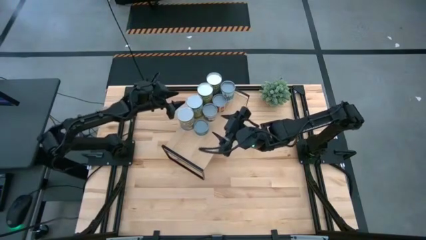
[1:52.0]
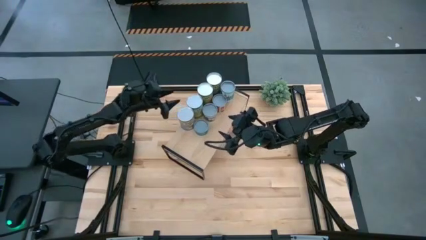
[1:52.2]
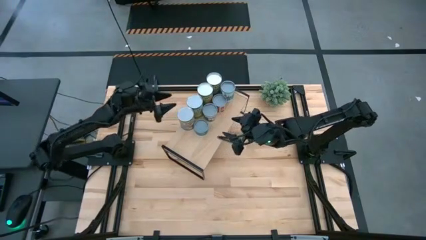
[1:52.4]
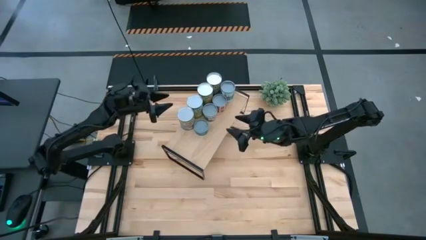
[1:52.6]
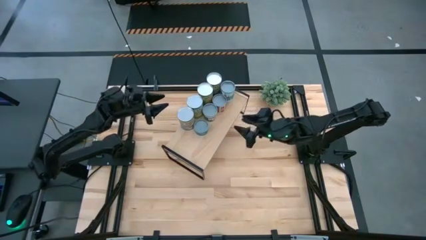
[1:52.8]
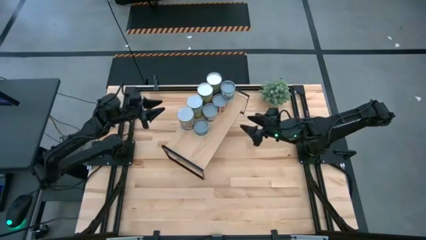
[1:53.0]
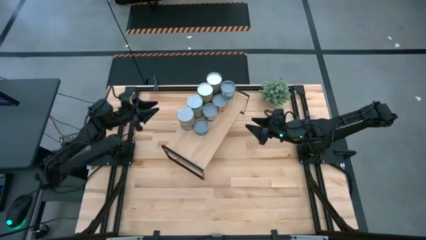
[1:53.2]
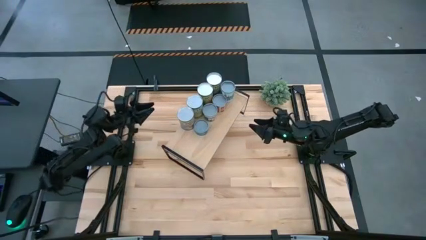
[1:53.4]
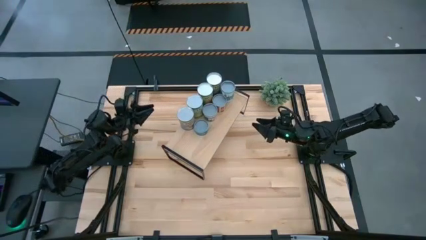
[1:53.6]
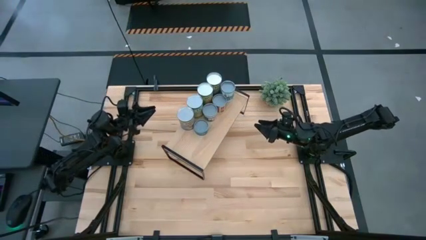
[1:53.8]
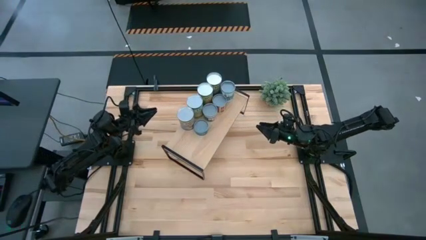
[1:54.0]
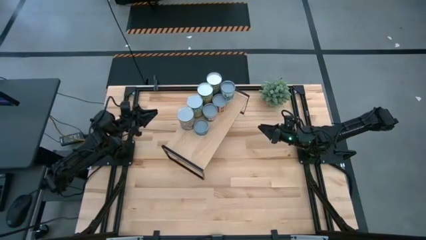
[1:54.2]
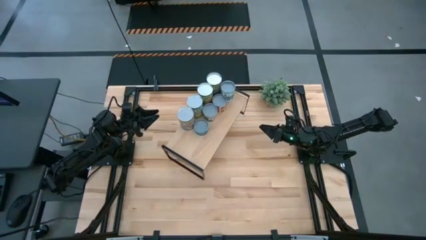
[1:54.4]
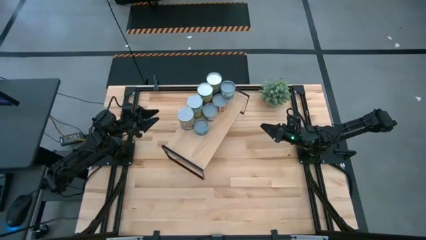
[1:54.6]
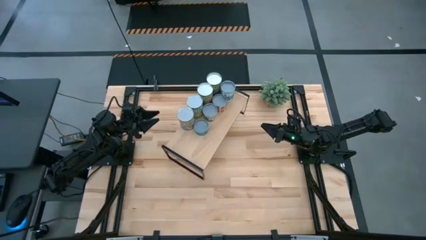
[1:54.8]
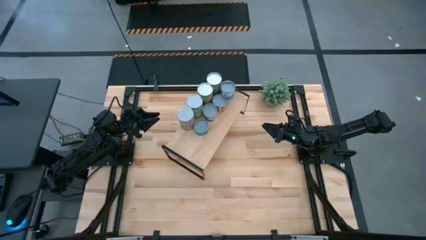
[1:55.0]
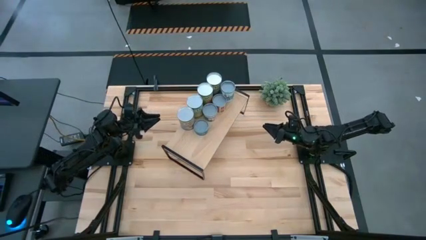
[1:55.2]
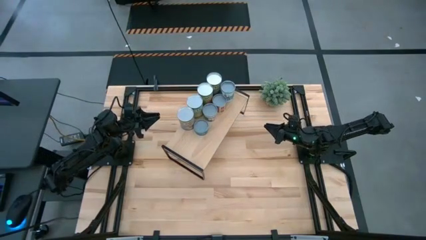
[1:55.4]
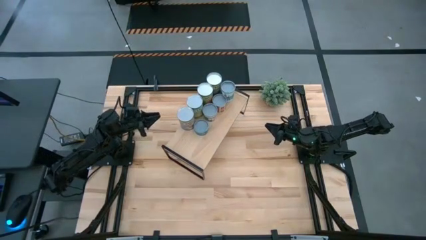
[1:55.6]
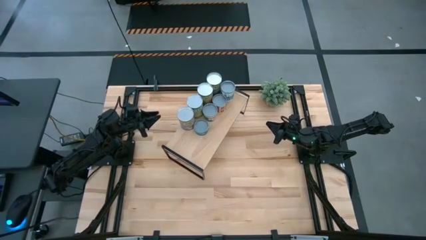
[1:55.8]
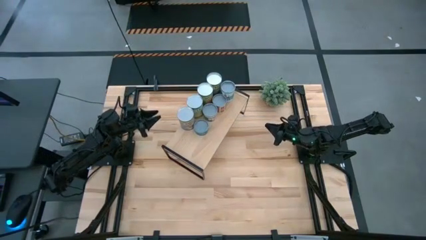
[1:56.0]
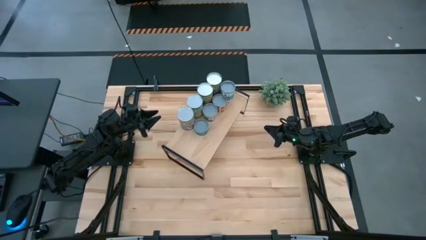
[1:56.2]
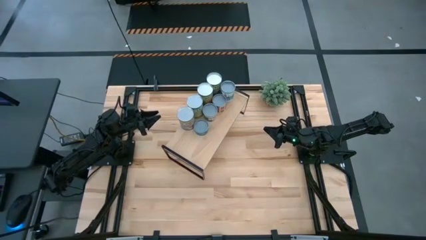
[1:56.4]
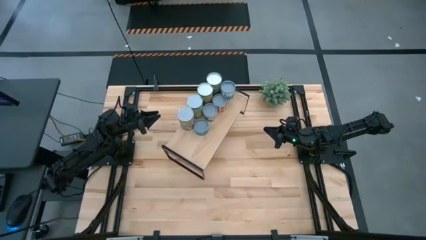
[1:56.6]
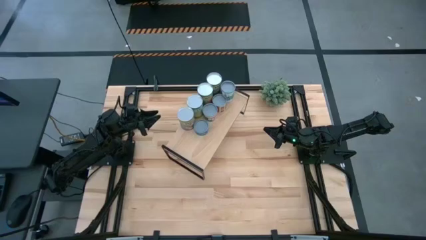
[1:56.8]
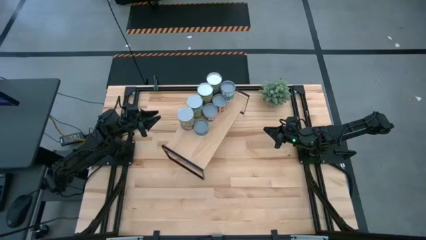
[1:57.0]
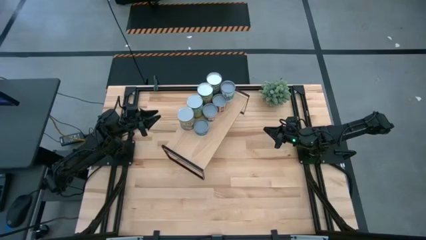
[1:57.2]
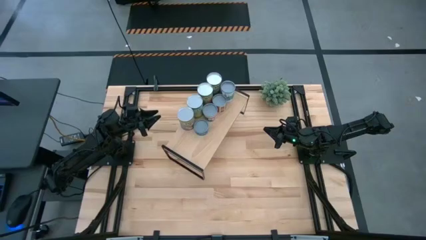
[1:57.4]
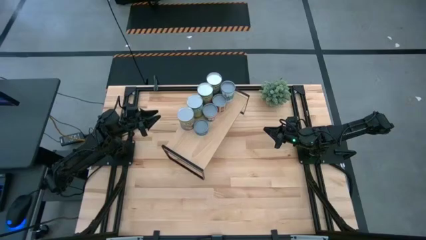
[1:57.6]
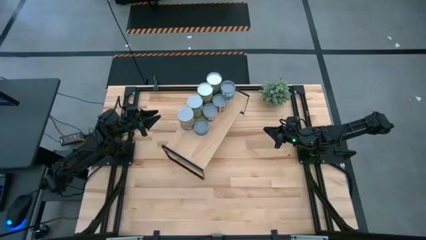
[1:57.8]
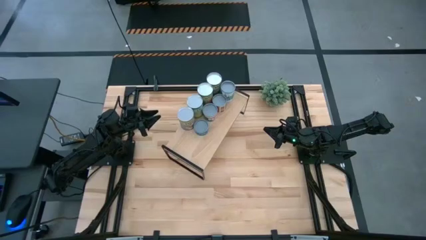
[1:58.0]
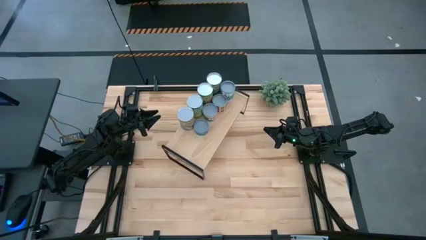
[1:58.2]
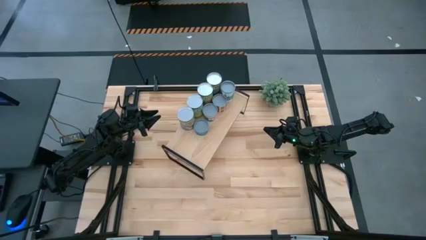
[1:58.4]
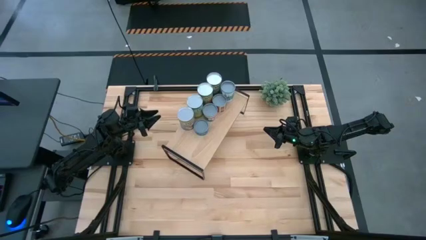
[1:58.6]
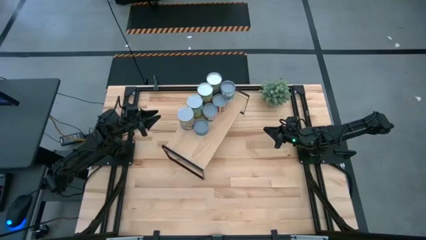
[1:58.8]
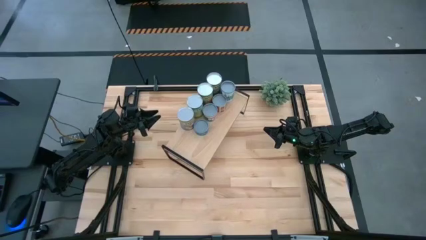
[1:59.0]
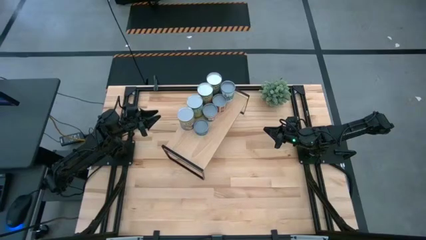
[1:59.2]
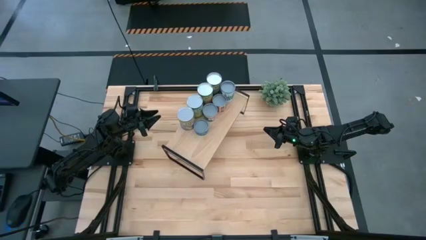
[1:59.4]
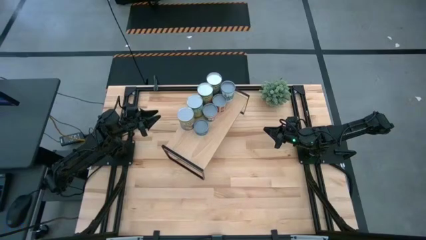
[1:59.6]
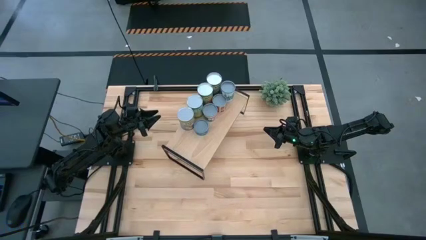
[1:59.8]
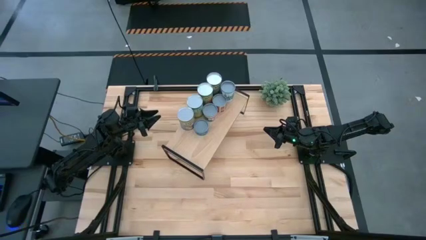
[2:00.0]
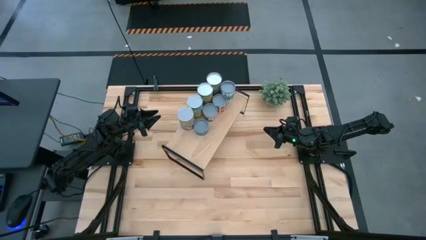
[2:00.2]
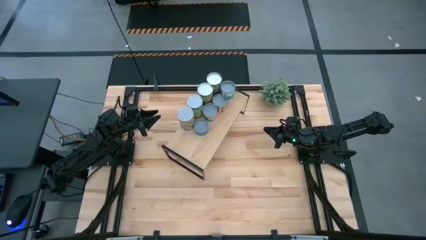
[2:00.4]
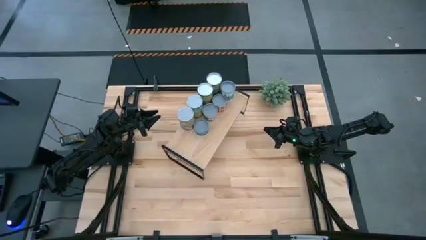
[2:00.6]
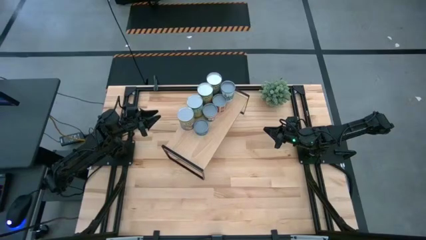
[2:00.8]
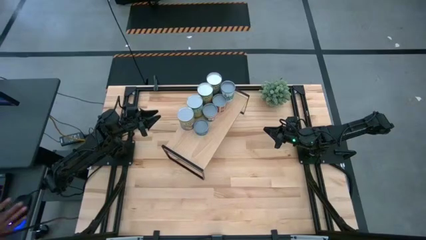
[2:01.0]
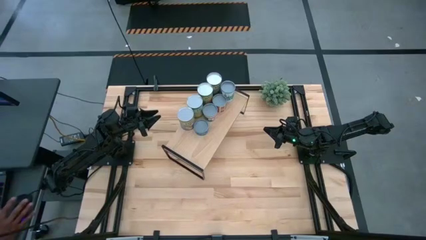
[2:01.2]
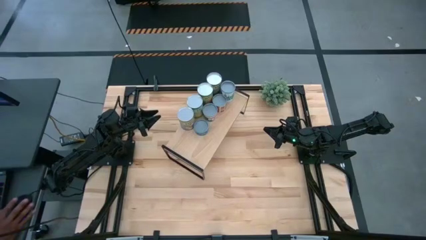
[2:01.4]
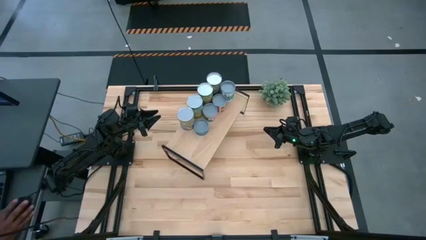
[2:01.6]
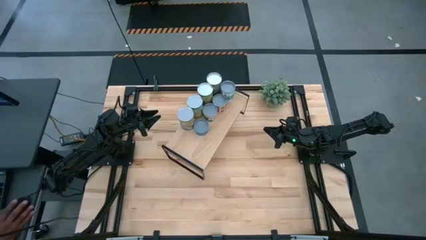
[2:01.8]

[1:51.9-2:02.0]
Task: Pick and place cans onto a shelf
Return to Home Position

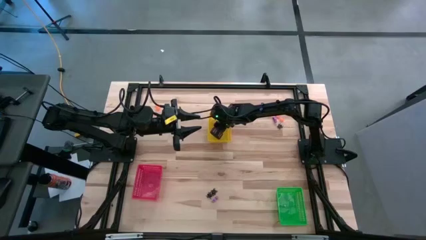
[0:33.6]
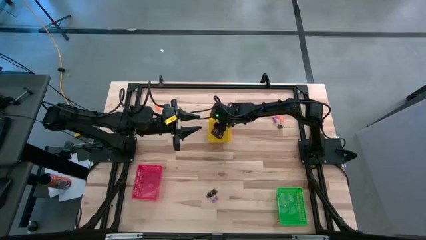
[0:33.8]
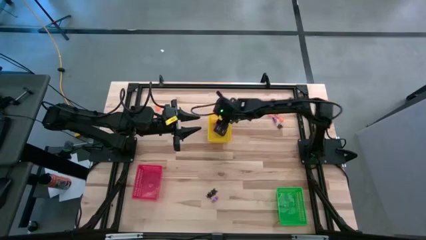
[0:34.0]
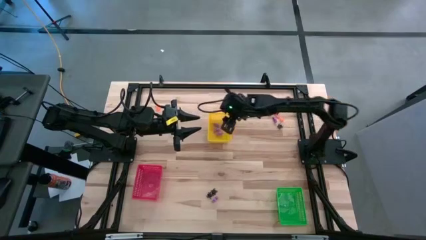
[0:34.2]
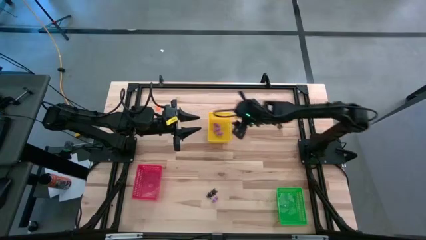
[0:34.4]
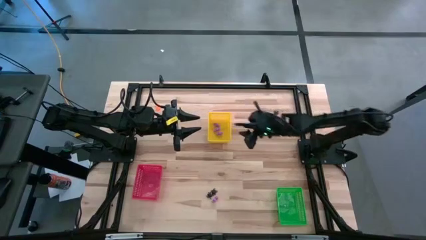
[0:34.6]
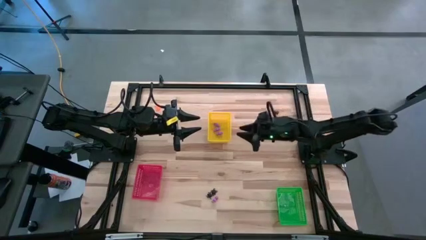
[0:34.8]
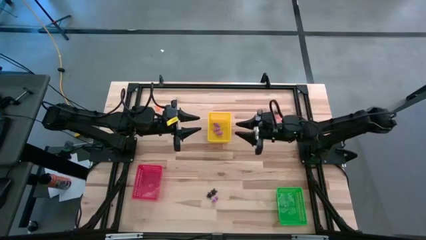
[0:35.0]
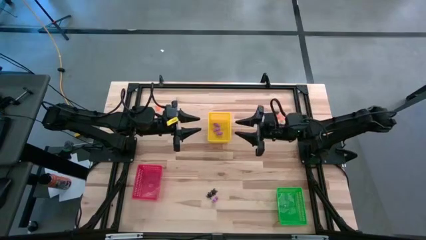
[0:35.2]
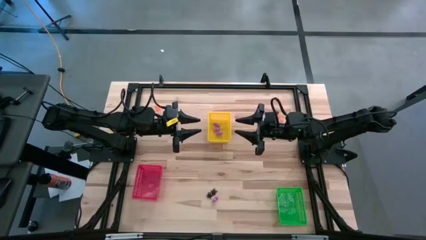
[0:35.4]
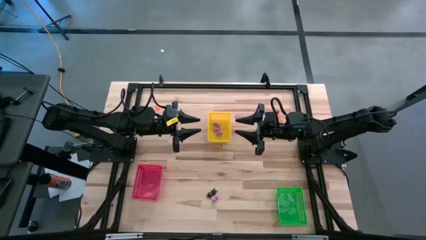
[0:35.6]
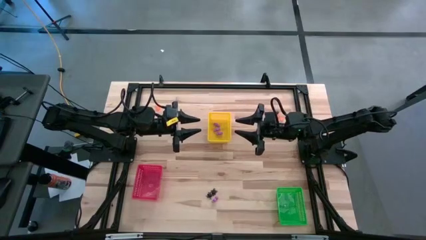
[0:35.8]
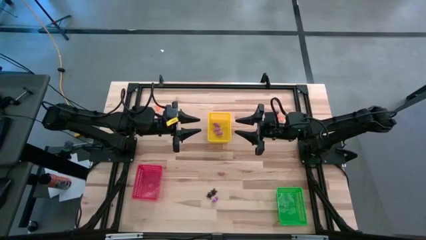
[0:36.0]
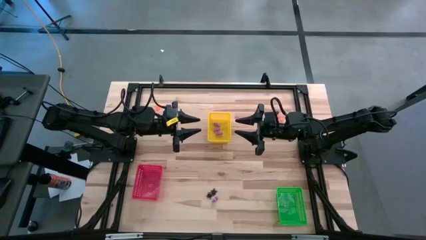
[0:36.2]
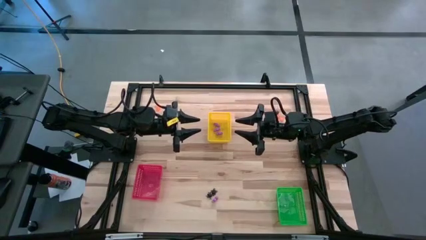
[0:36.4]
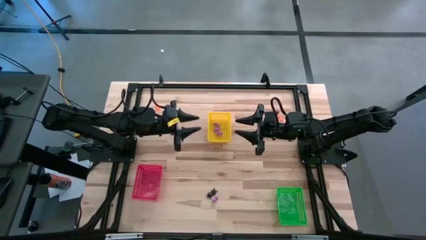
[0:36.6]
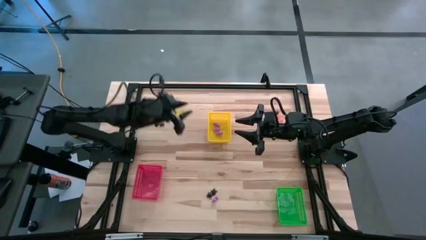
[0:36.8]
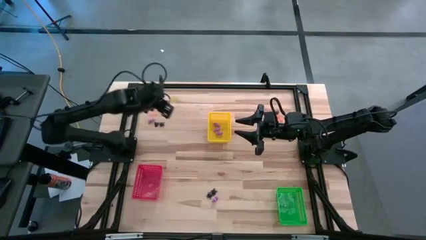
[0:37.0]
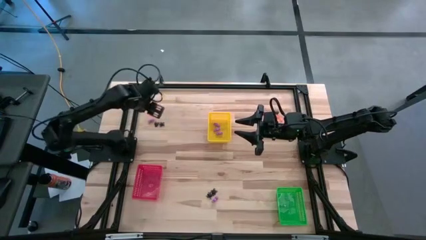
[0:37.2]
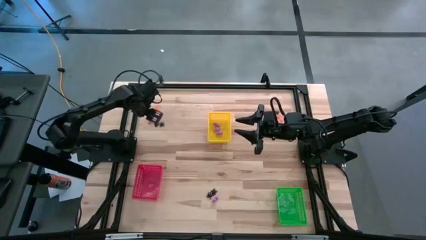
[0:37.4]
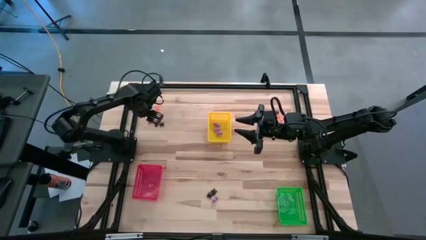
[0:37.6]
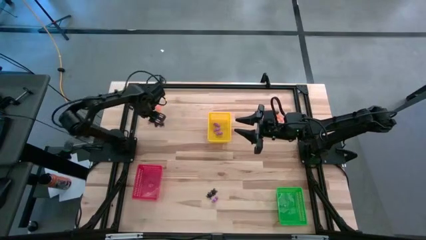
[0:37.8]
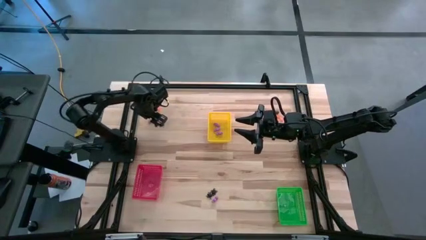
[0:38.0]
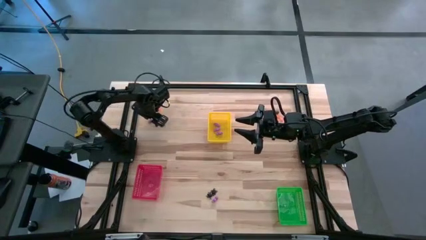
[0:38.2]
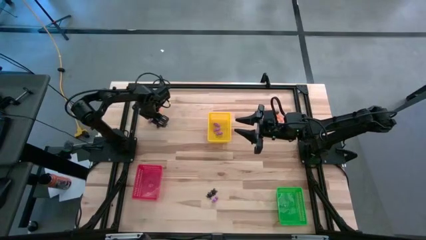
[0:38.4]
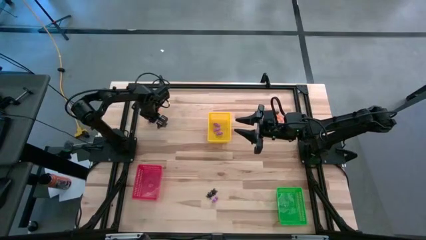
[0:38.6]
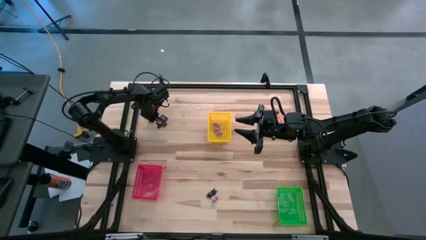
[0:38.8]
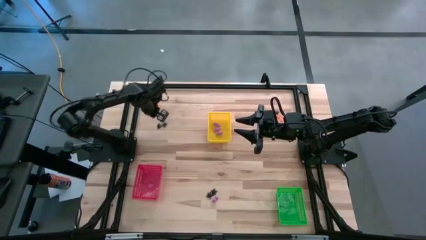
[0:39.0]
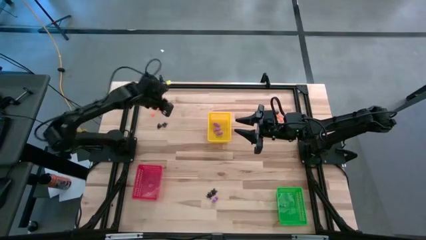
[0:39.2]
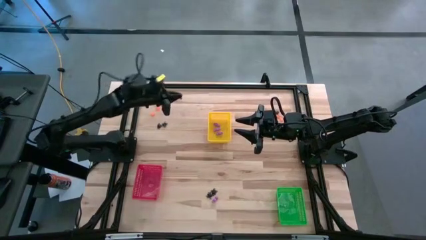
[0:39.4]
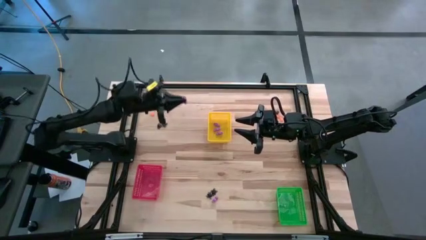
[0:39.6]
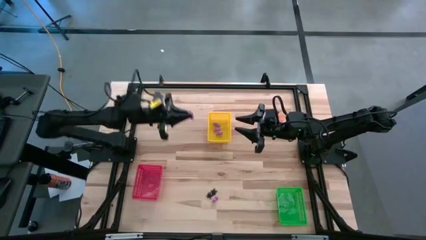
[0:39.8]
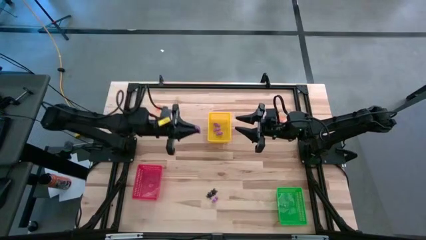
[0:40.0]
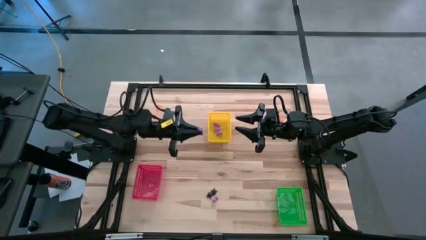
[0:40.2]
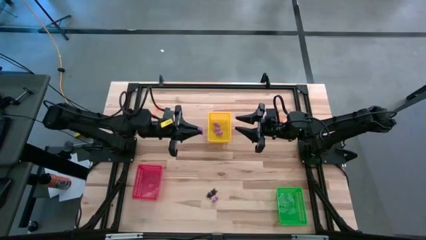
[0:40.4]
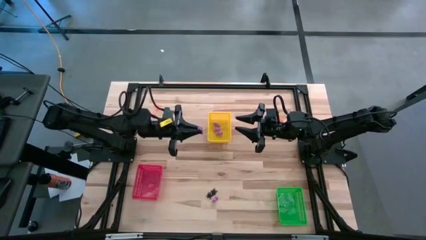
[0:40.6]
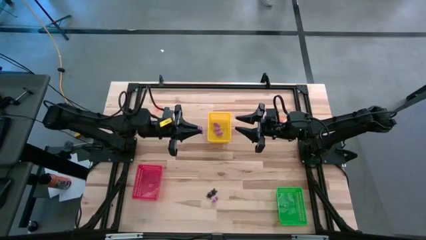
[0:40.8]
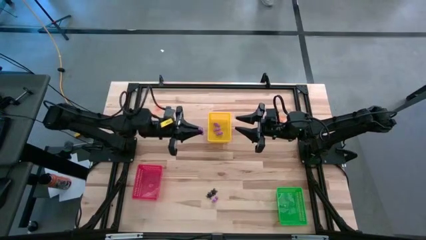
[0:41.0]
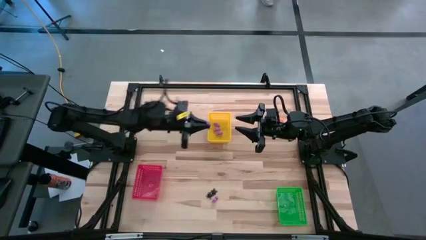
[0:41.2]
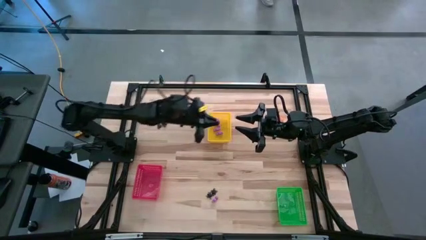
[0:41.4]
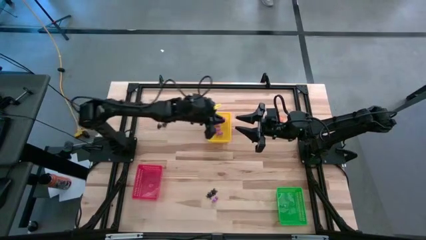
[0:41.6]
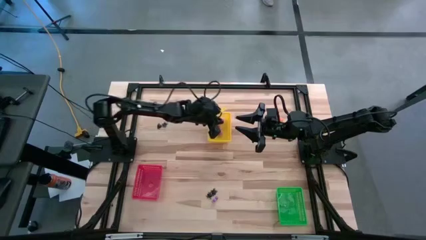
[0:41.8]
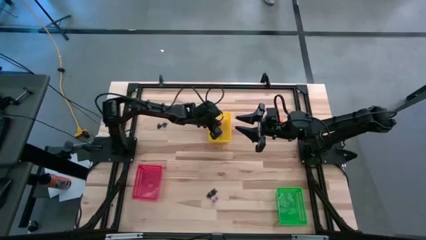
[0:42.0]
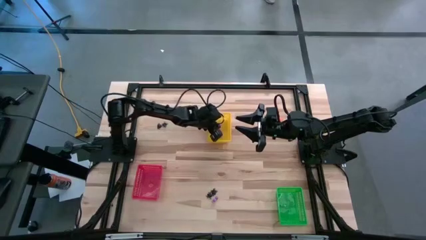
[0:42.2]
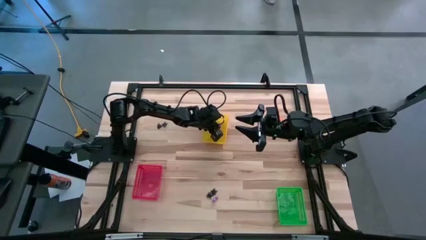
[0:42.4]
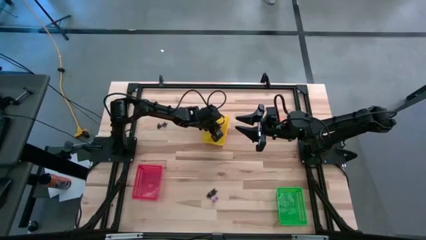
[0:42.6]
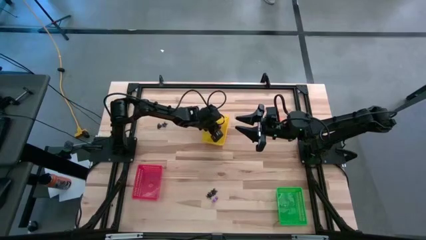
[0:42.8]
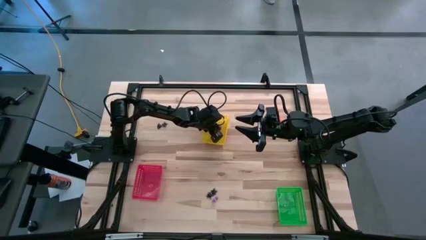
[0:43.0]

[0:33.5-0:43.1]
Task: Sort Halloween decoration
Put the top left skeleton toy into the yellow bin
